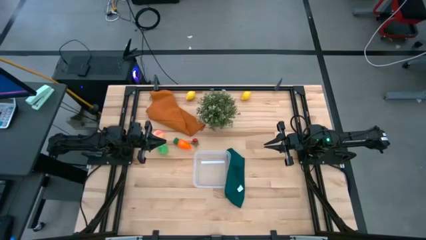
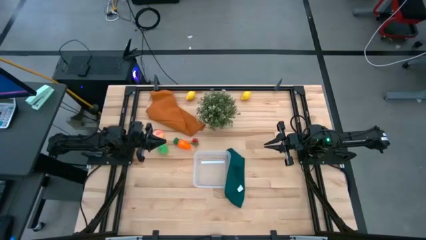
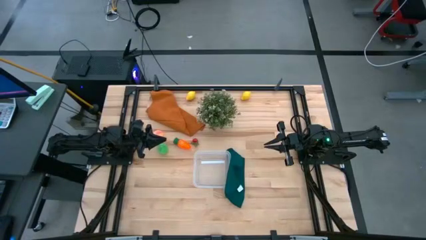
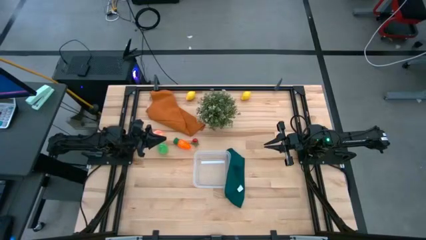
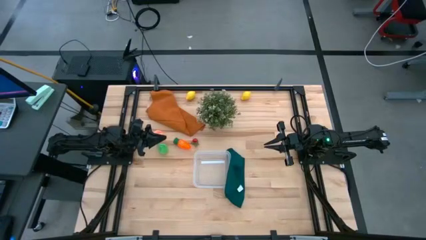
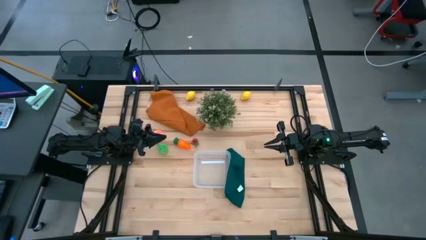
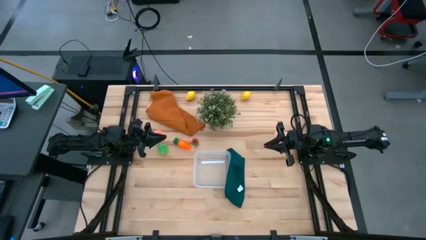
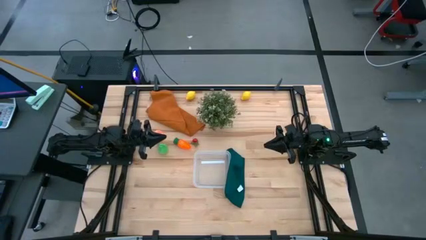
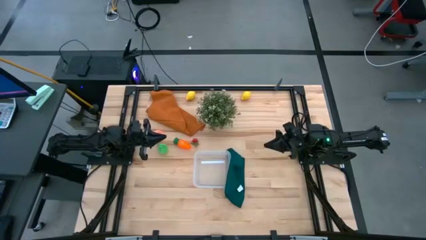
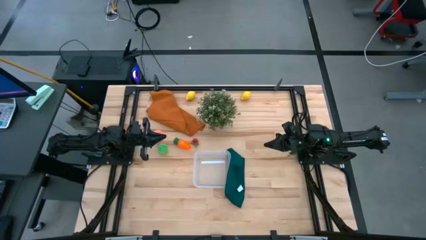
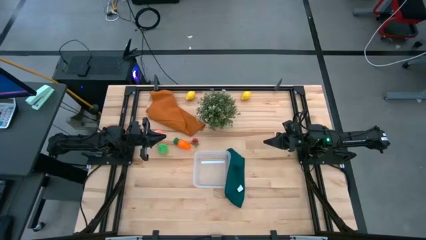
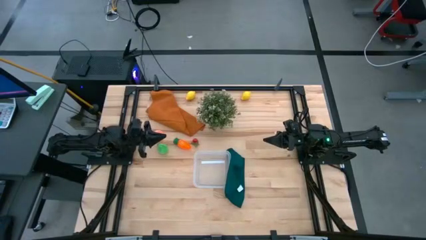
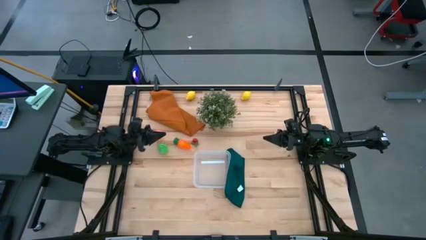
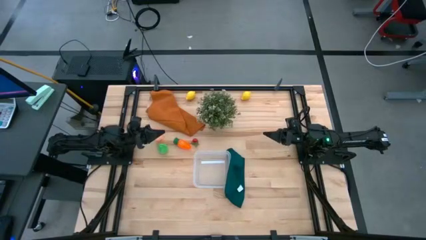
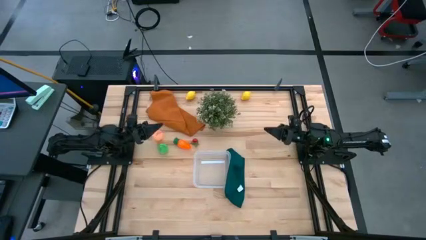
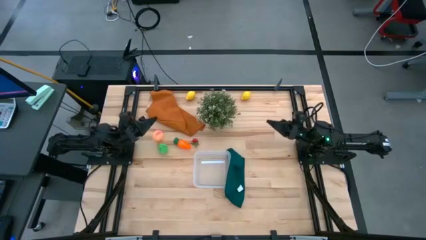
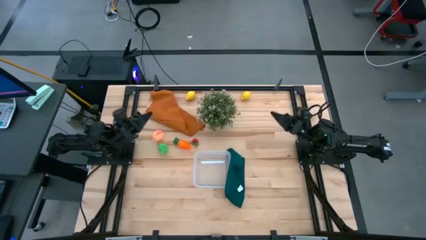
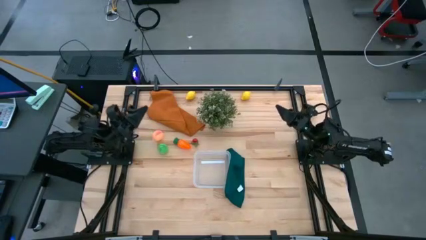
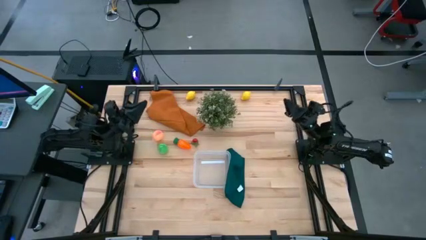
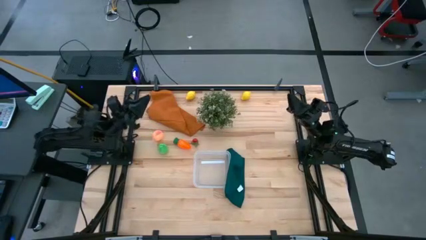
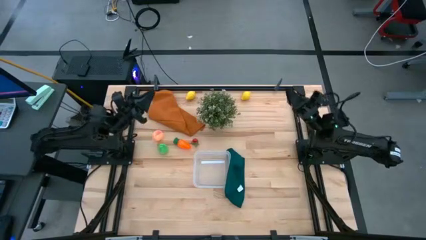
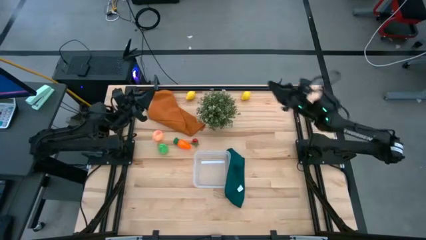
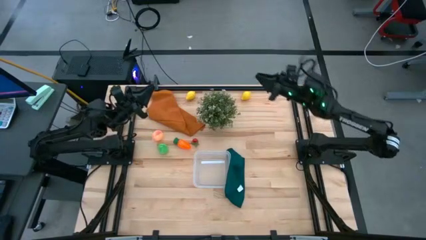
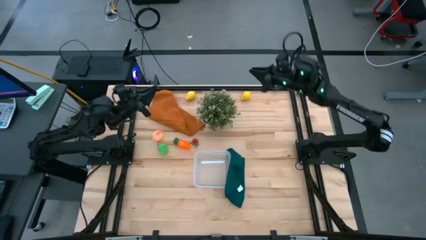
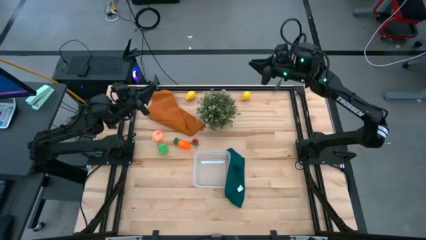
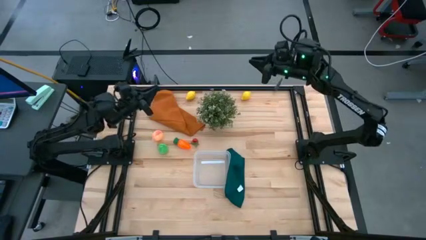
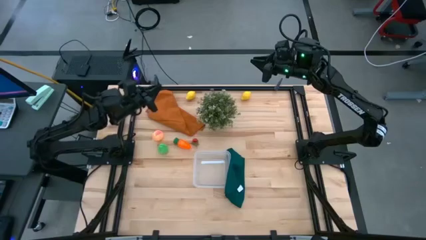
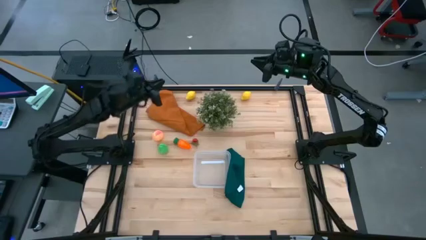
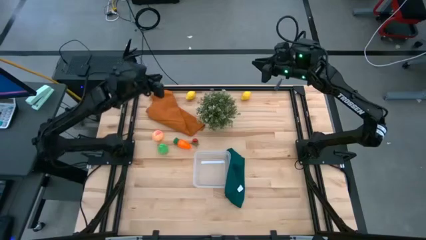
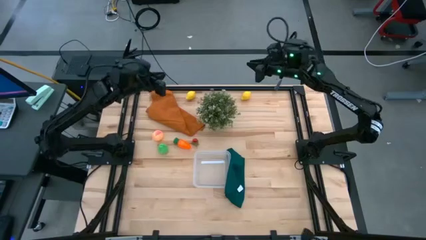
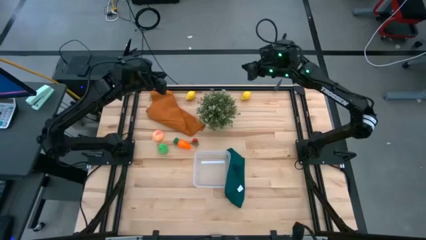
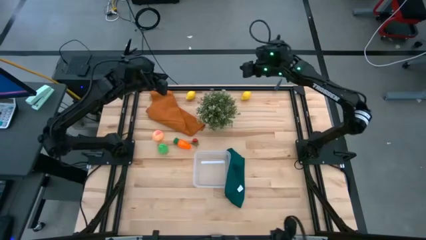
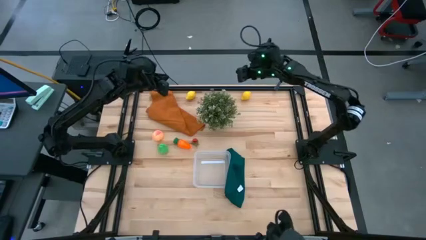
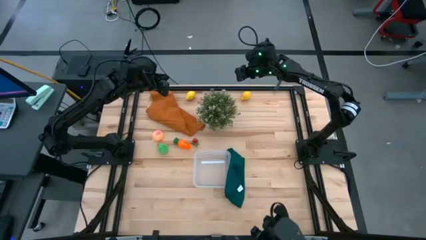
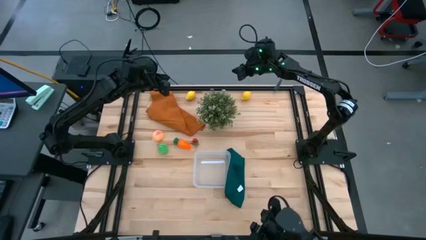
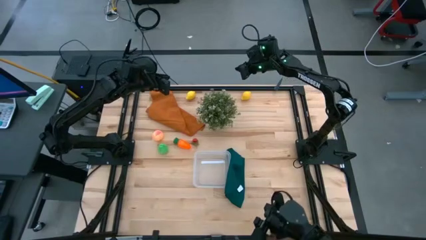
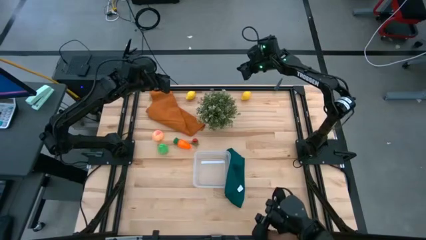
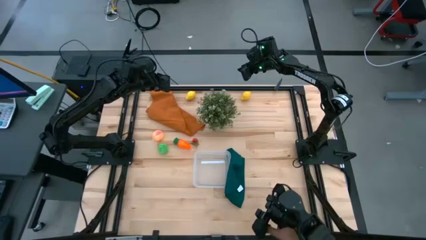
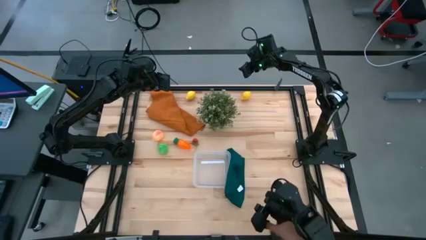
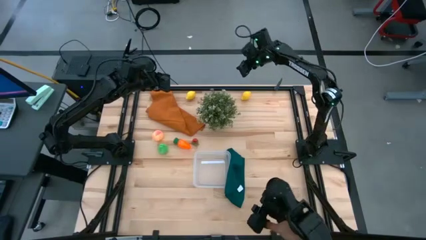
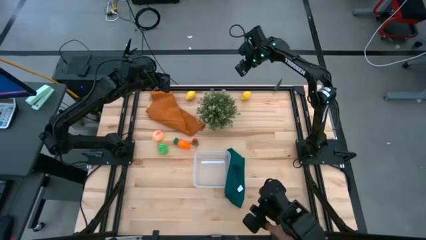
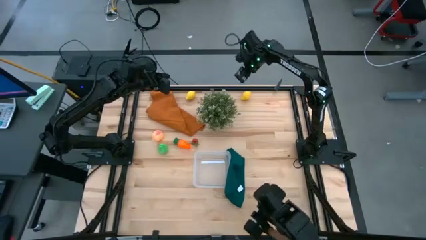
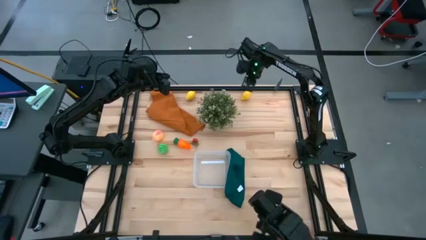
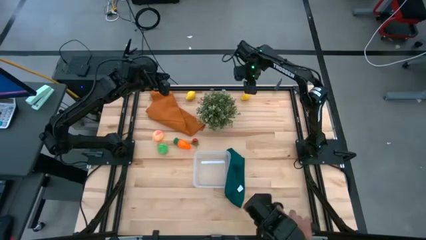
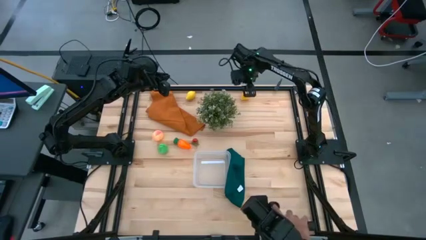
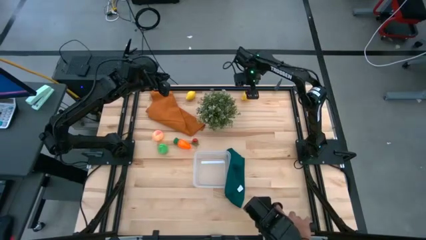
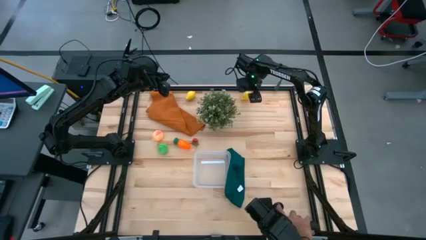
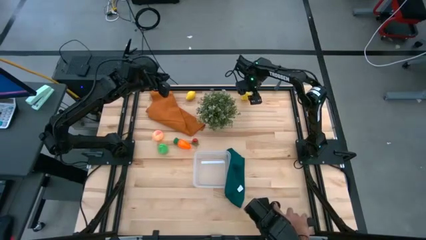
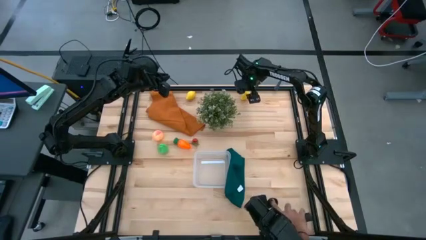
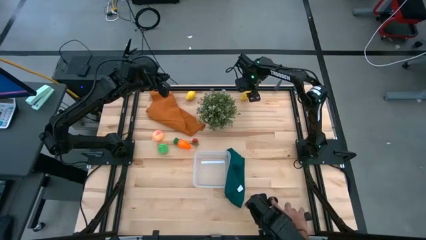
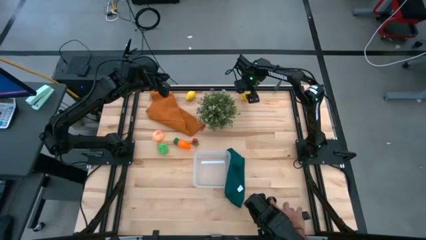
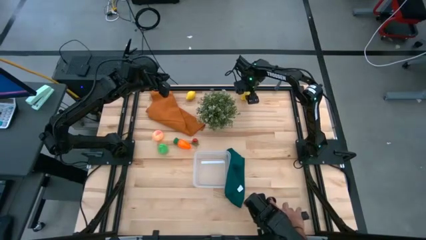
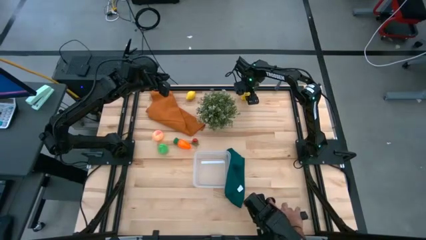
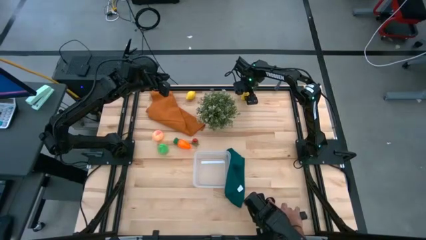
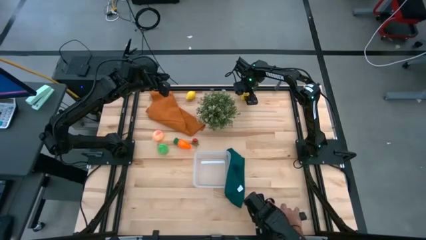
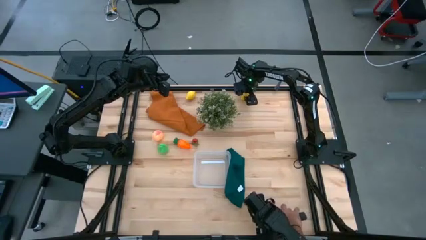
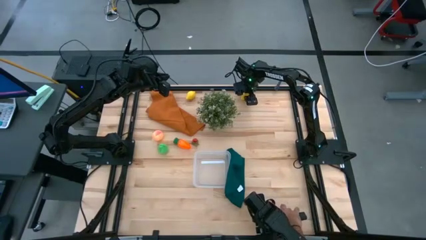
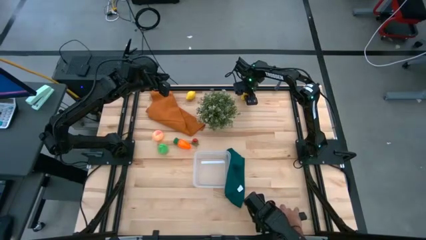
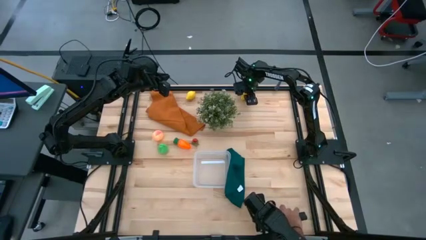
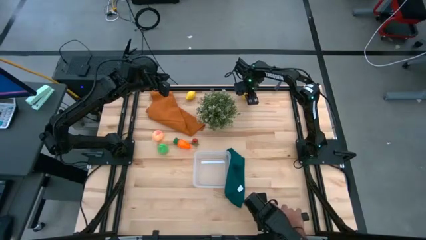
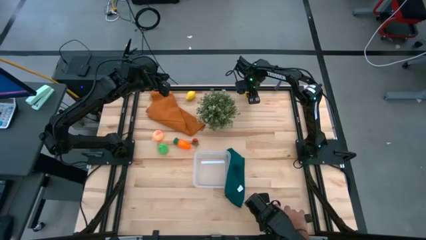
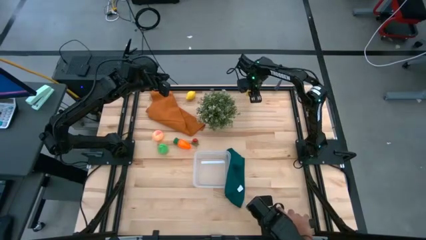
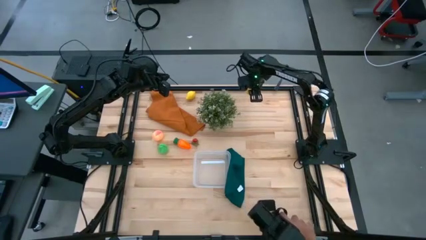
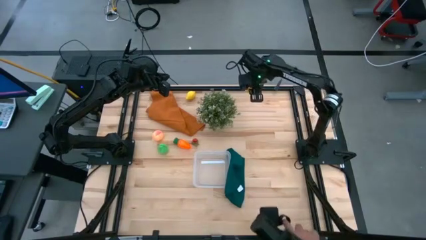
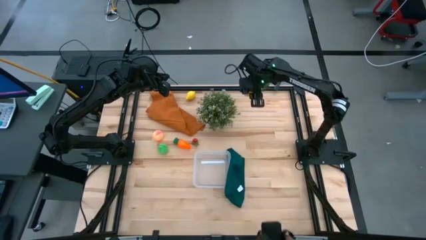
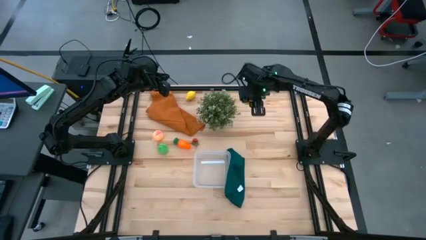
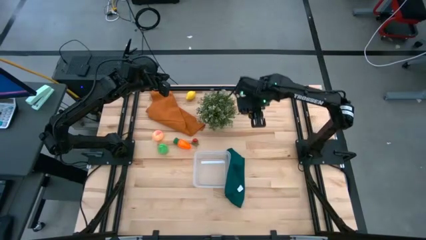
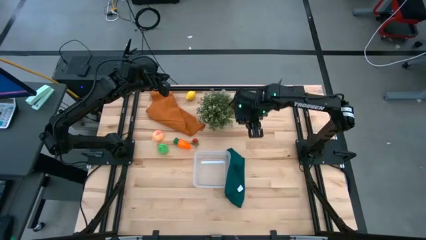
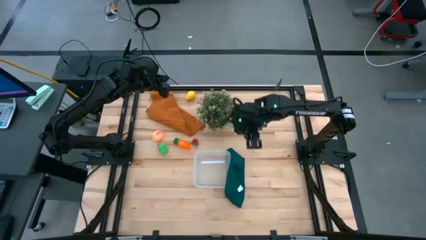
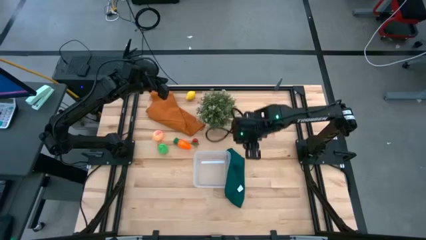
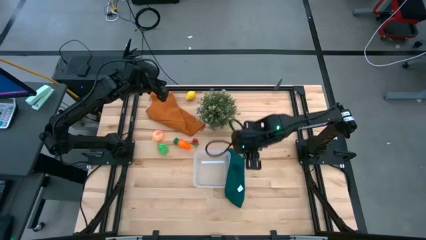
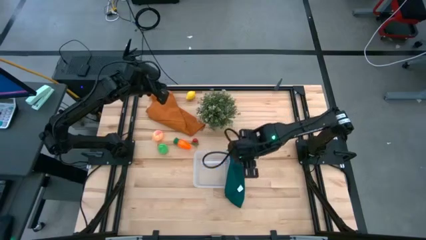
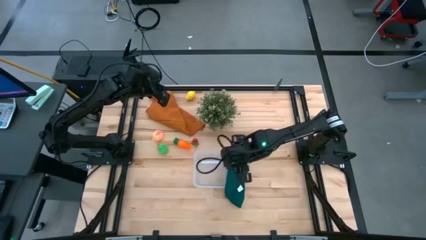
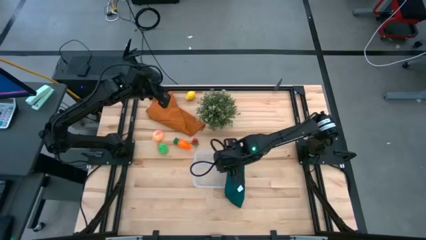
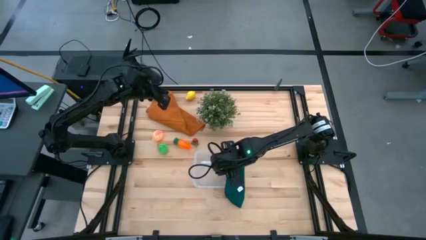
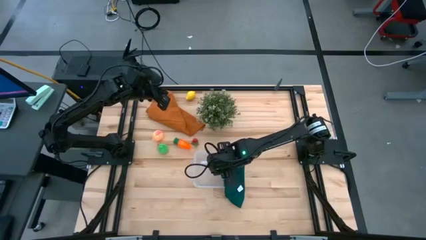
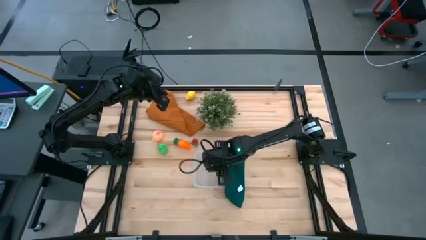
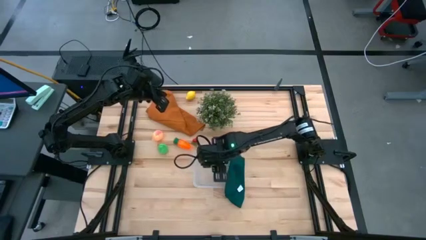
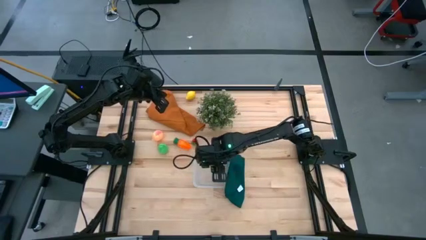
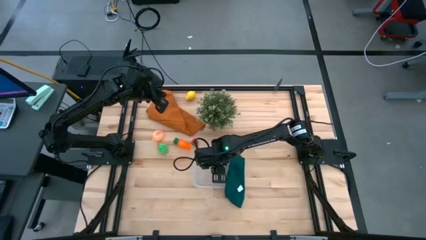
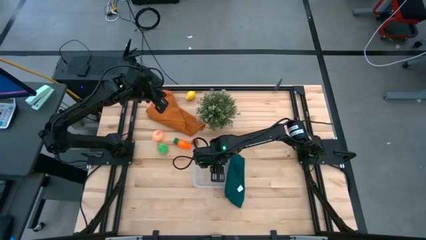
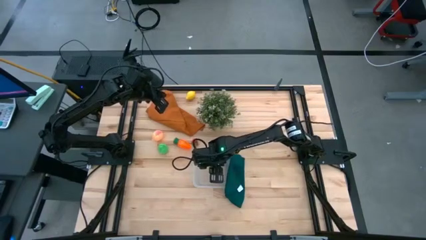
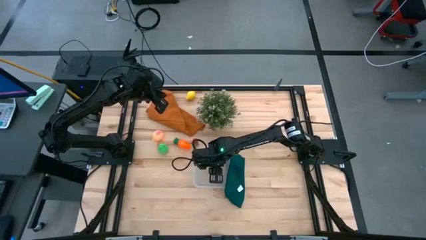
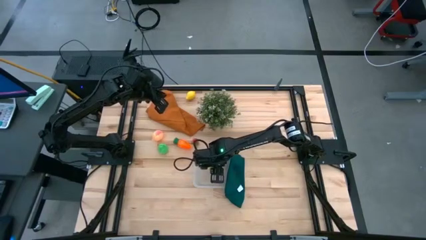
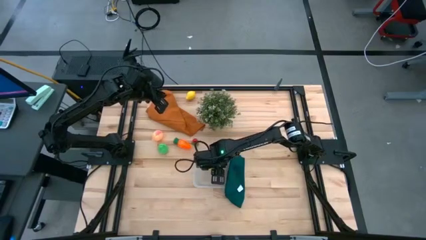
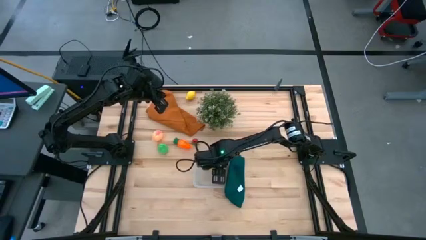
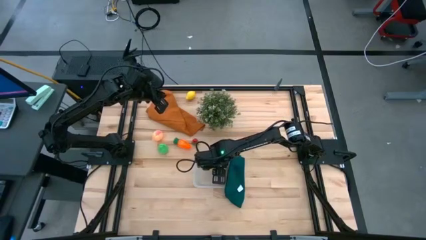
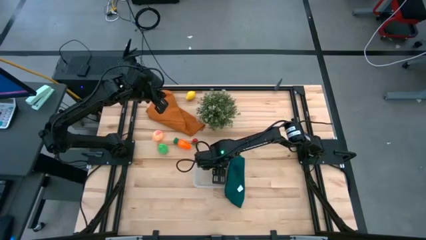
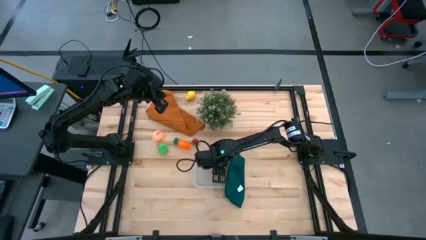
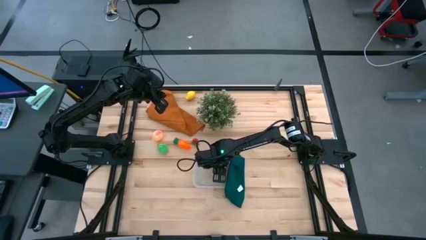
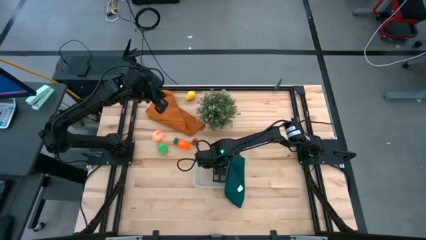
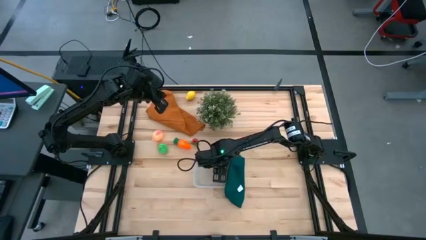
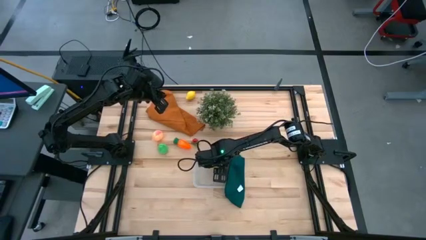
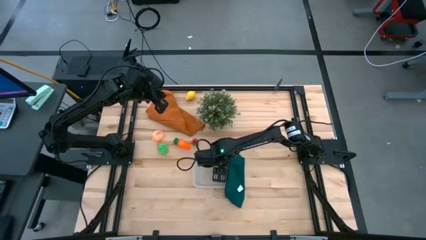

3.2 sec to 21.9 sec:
Task: Pick and placing Produce into tupperware
Put the right yellow lemon into the transparent bin
